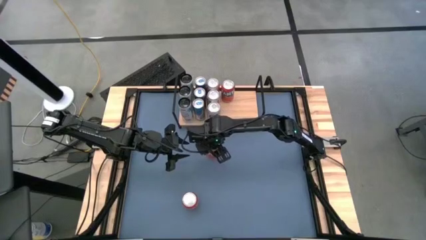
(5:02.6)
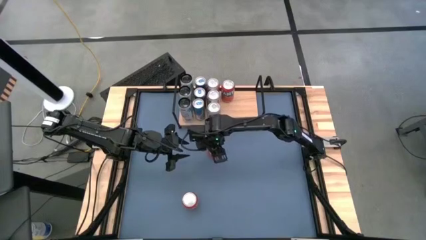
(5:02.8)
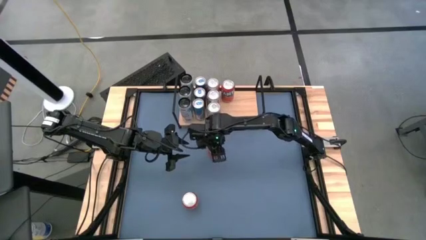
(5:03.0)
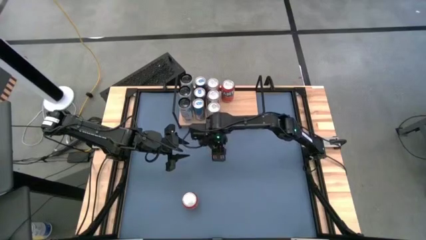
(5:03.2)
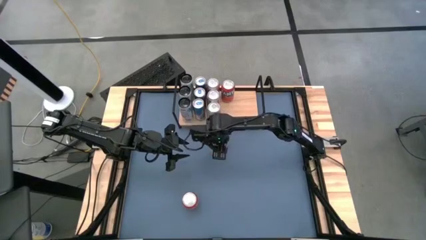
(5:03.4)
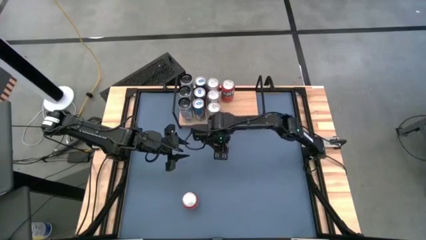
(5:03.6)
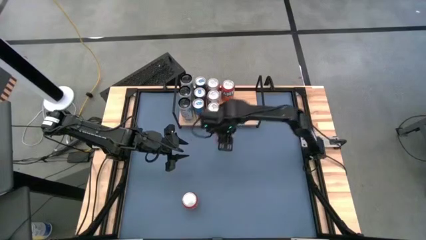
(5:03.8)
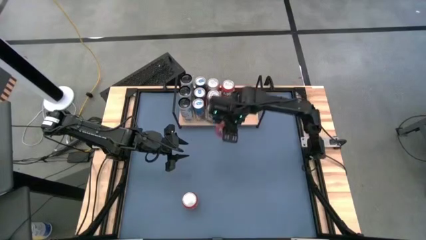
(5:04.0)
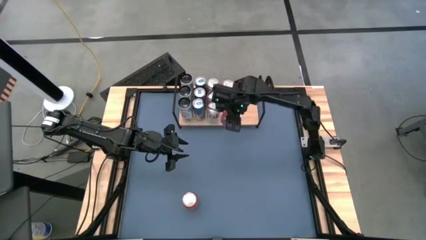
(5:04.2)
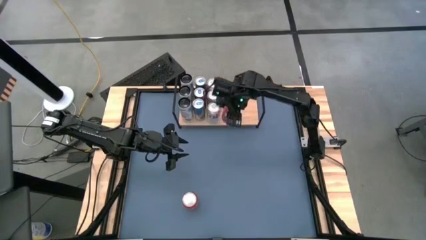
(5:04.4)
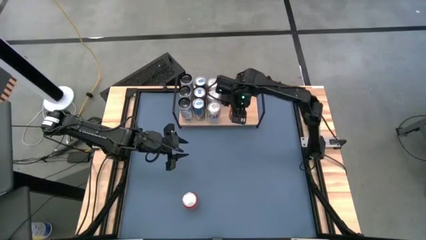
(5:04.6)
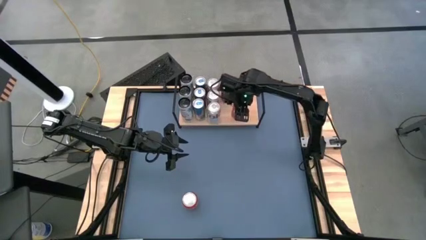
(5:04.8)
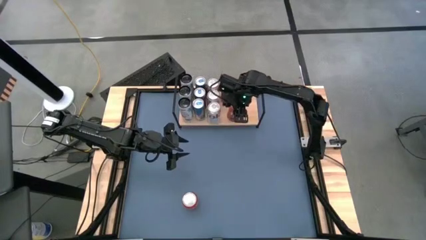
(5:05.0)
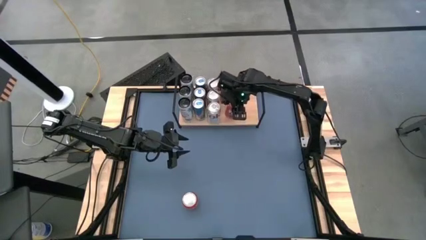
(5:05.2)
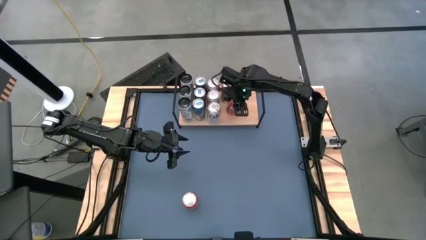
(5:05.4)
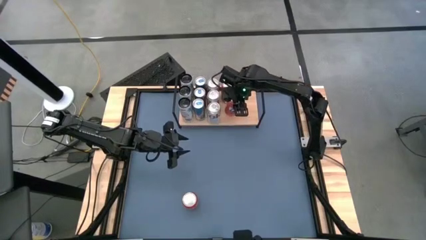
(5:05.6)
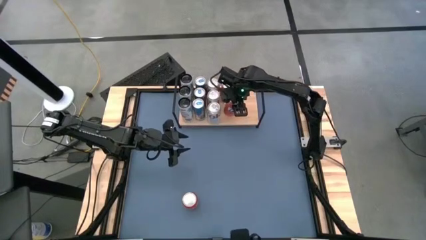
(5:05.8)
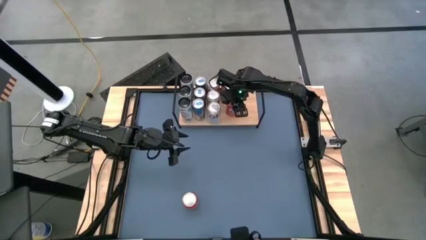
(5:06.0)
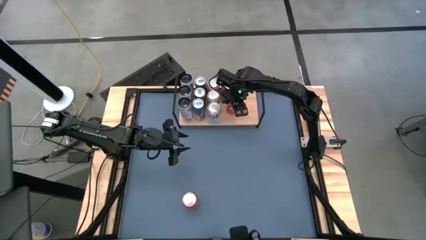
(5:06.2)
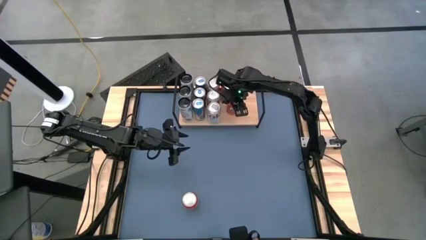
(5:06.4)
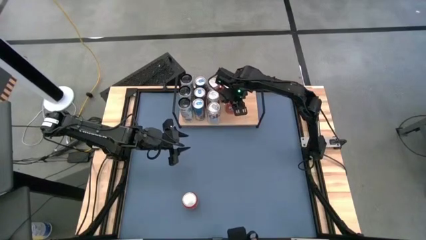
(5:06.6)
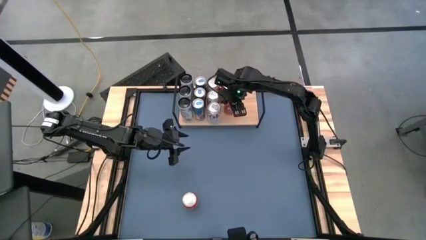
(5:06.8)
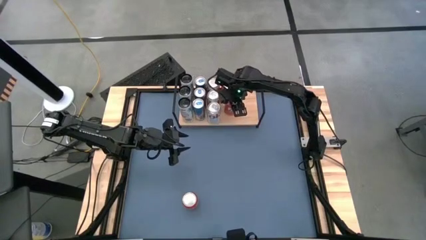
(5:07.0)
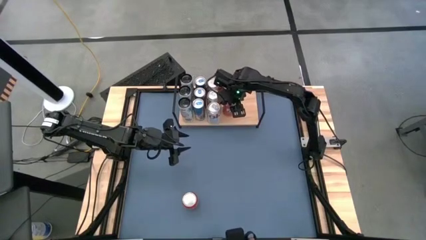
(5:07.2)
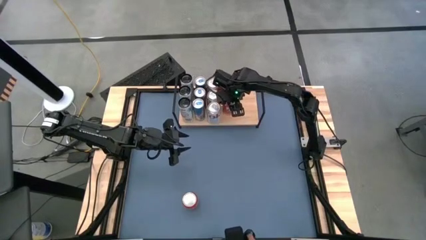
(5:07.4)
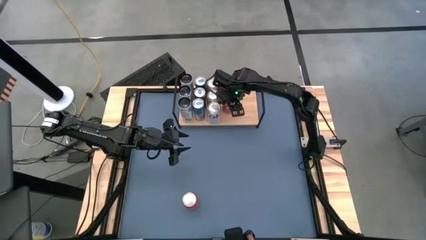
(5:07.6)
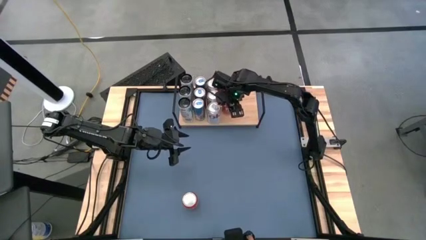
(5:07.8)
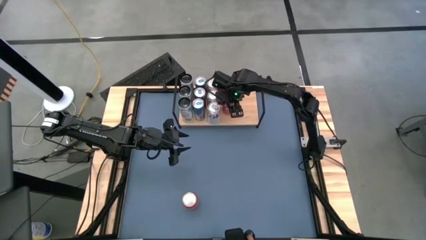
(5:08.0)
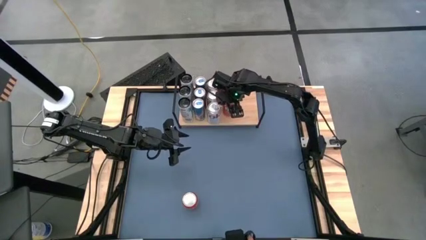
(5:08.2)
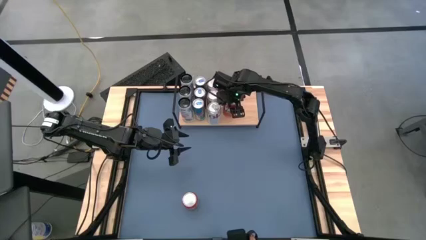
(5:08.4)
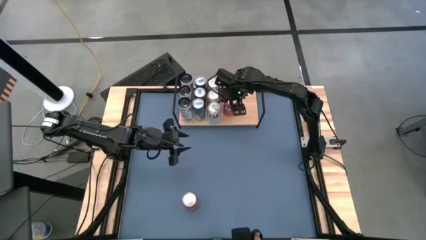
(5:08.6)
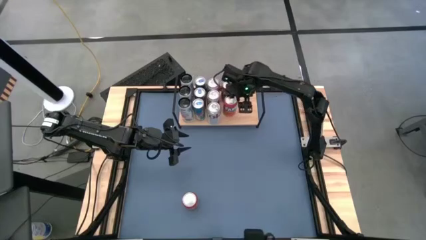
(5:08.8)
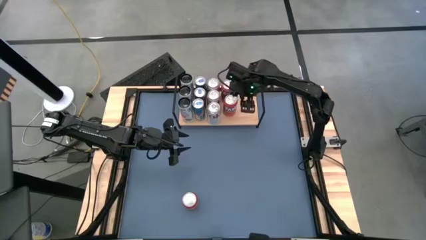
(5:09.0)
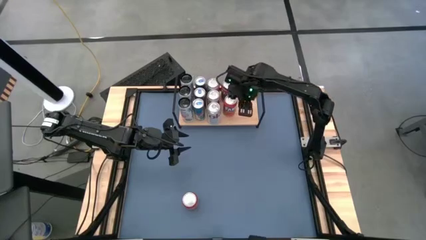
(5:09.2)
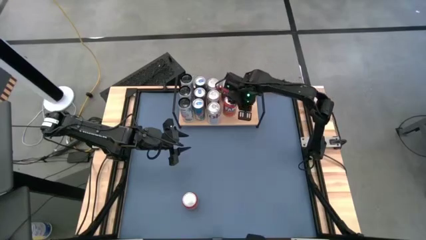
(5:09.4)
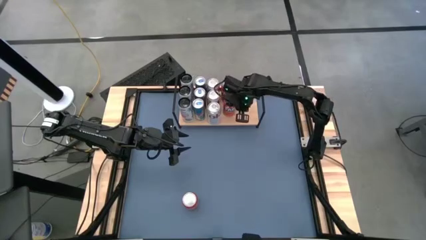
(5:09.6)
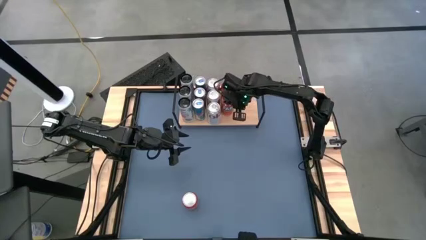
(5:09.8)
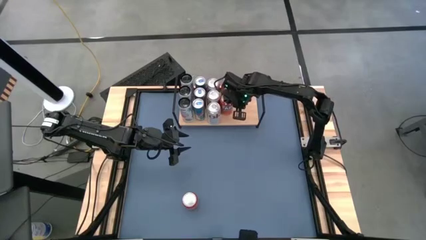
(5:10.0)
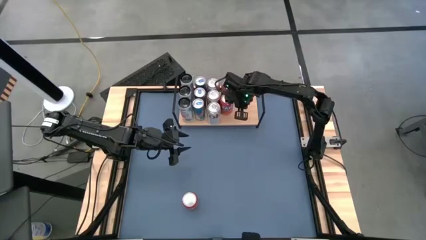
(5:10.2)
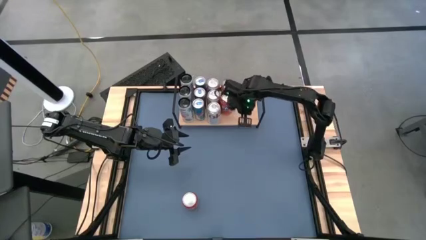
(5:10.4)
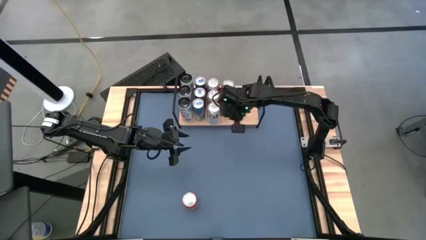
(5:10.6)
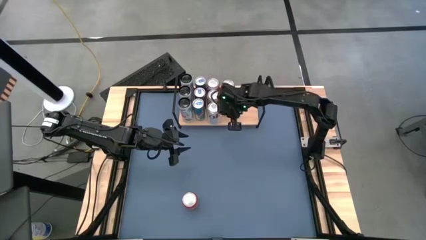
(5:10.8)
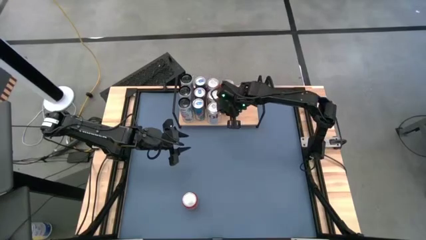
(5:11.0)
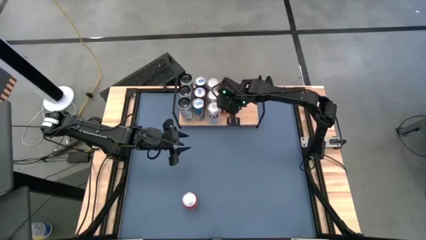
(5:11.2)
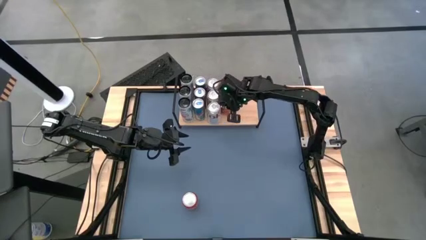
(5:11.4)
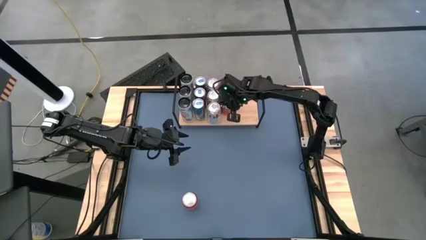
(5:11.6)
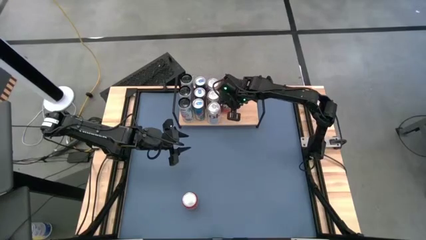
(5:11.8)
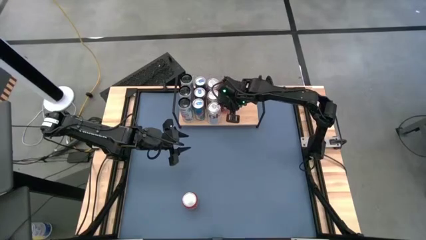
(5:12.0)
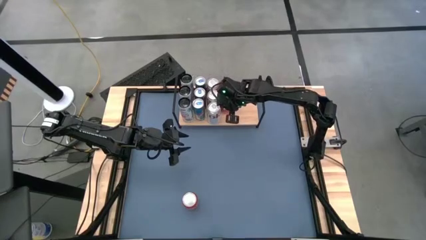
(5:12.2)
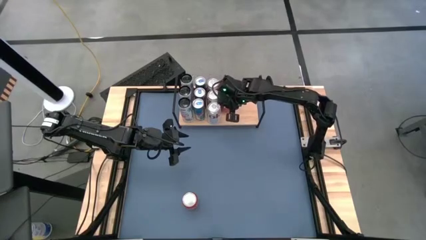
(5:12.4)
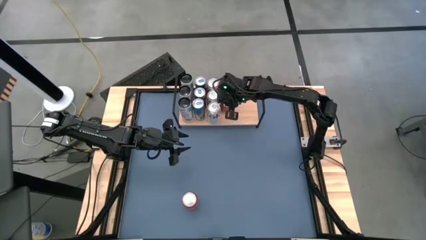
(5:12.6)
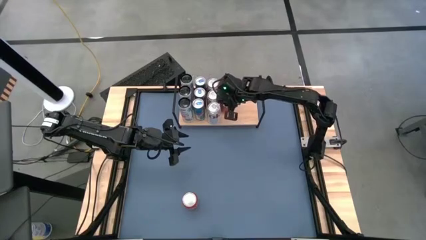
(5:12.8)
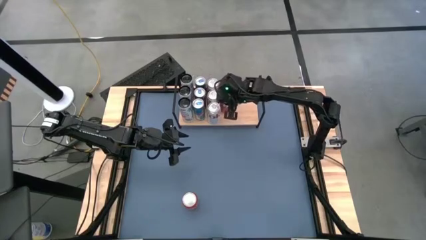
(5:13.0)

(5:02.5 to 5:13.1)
Task: Place canned beverage on shelf
Put the right red soda can aligned with the other red soda can on the shelf

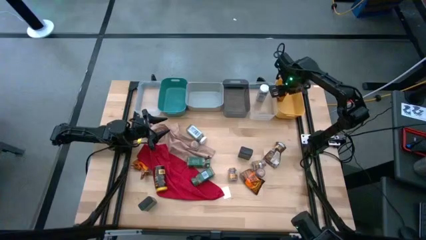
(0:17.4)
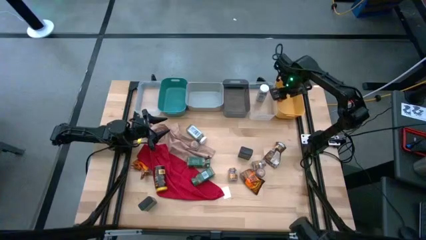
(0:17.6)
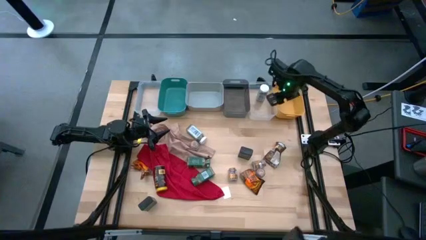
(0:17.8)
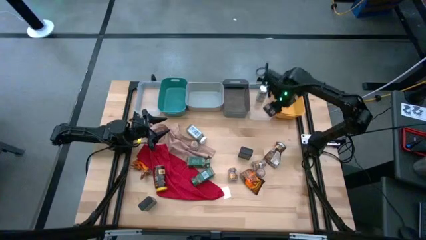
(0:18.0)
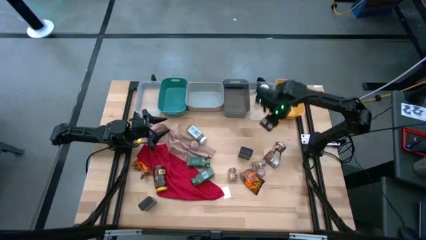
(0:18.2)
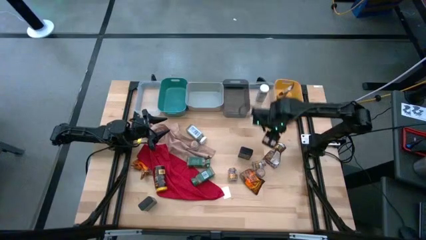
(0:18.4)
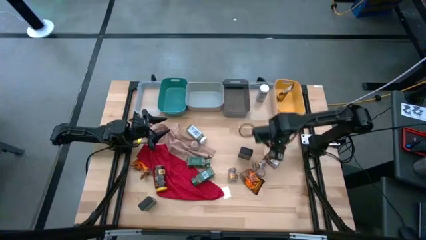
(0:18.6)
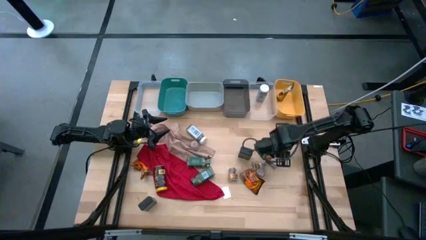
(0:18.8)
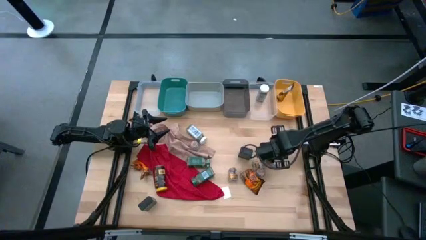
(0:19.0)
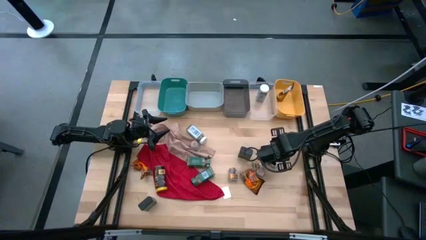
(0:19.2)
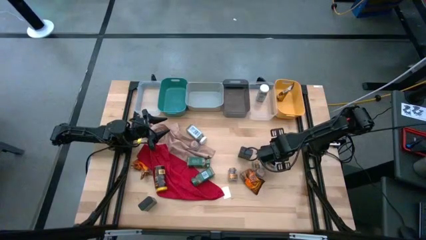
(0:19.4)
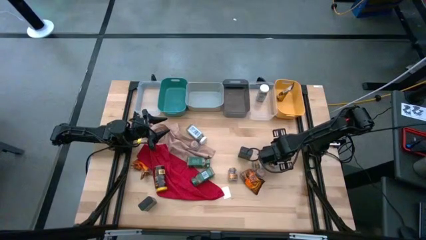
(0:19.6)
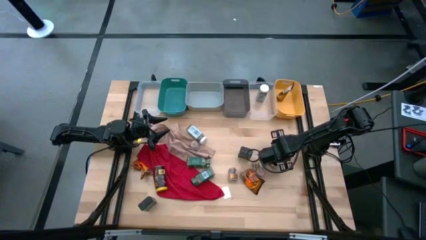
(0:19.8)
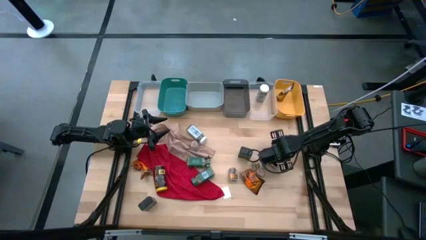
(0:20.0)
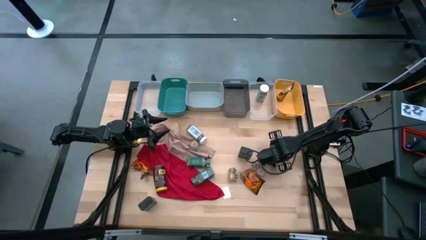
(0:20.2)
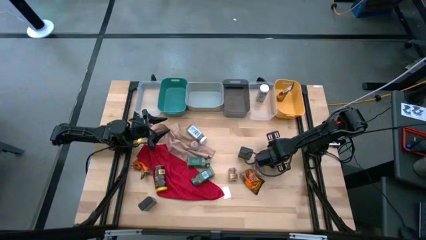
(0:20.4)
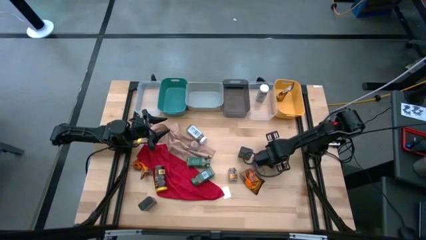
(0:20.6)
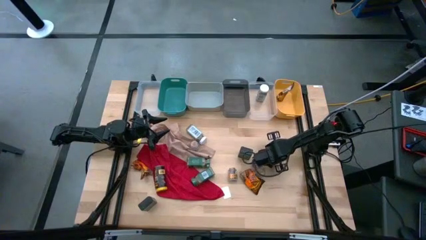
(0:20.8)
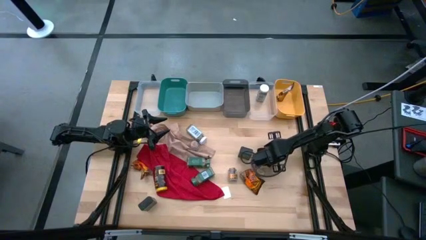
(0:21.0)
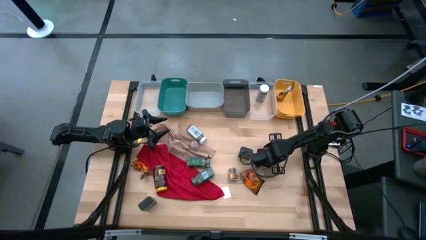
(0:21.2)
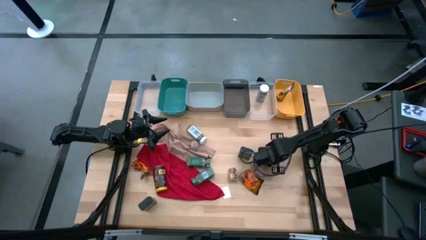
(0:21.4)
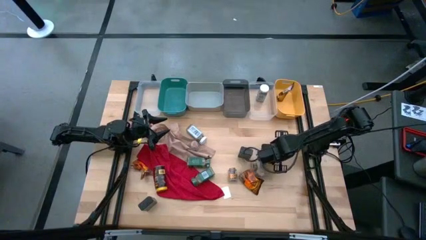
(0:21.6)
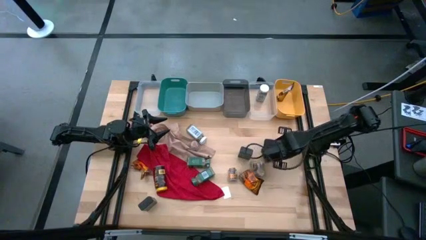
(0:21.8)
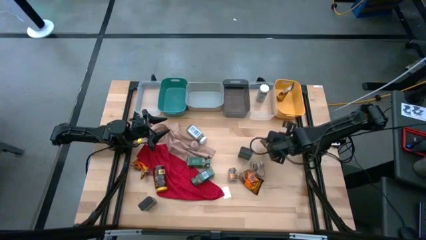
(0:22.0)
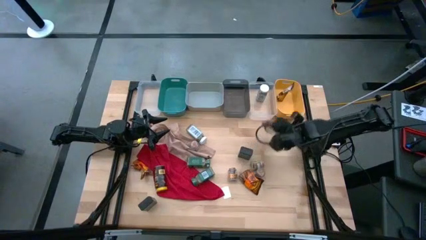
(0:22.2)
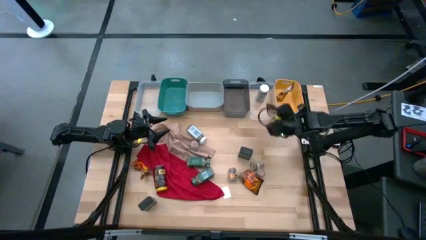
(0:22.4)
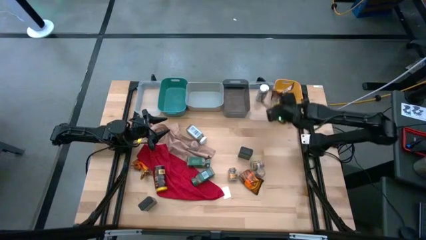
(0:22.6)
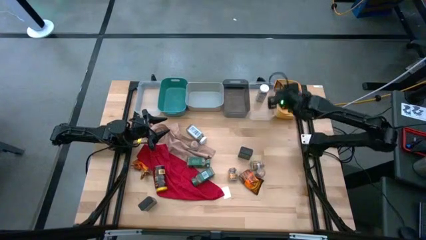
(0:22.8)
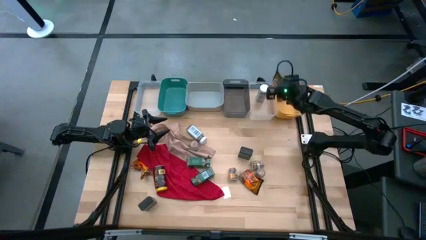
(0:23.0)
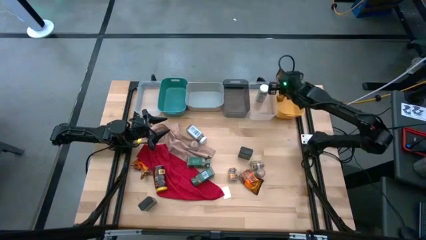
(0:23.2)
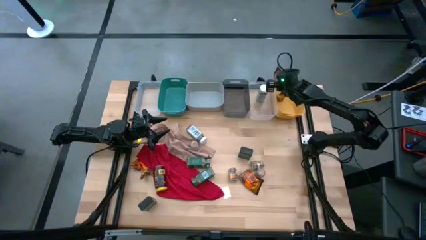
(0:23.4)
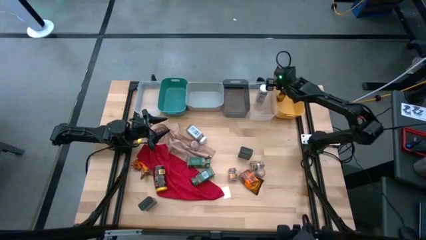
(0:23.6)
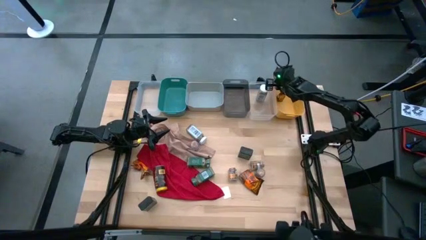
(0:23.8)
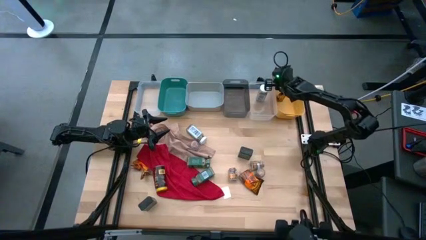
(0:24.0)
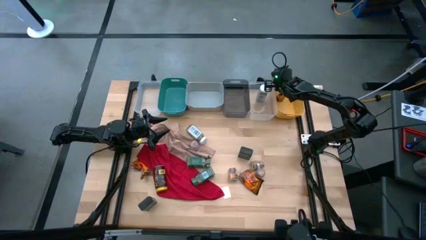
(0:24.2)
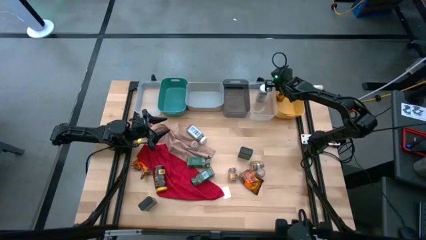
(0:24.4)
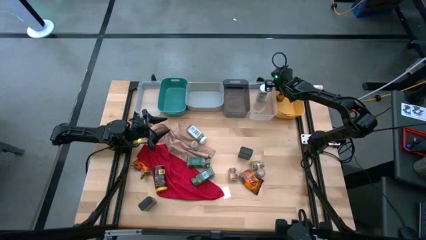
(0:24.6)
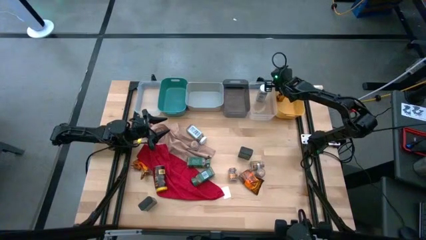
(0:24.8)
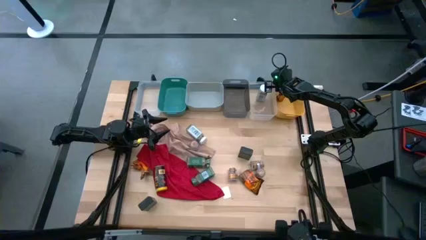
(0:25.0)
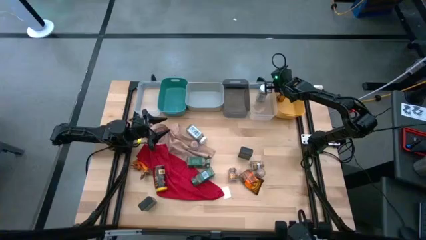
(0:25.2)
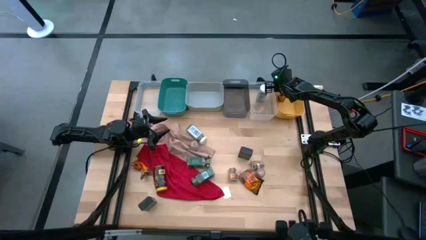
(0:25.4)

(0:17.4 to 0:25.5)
Task: Sort spices by type
Put the orange seasoning bag into the yellow bin
